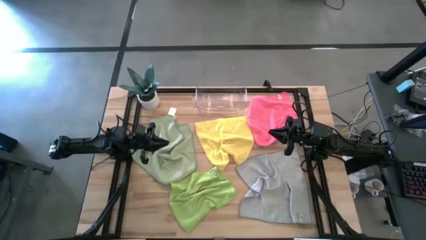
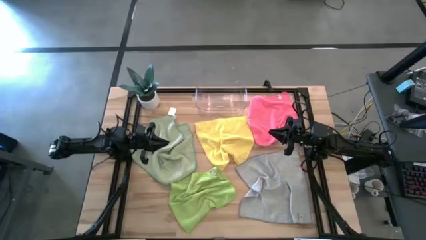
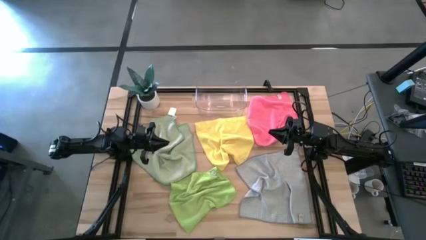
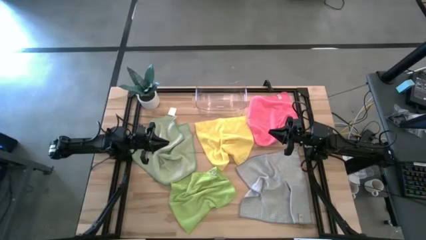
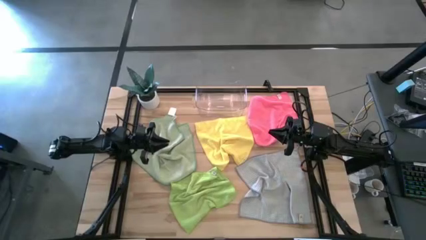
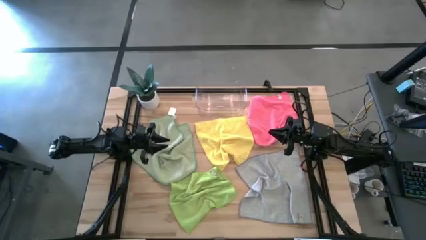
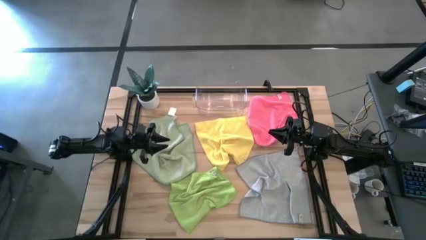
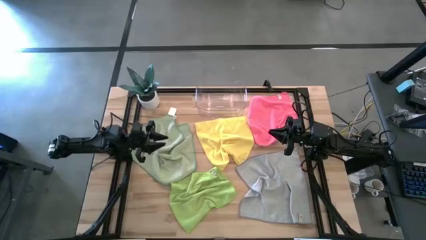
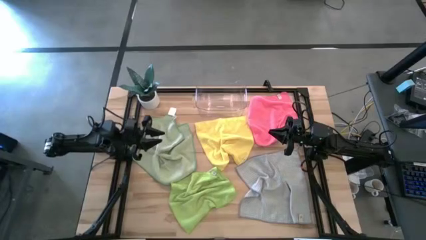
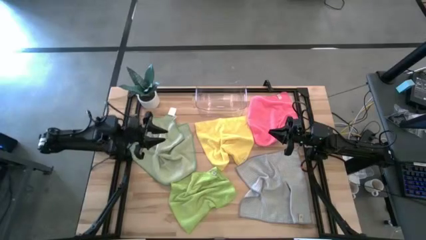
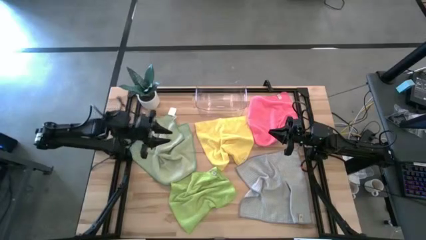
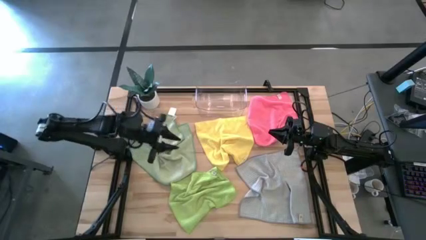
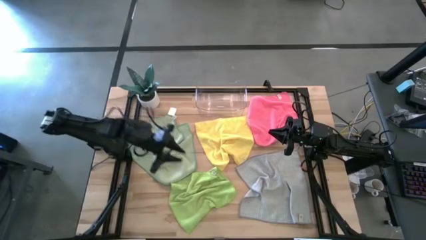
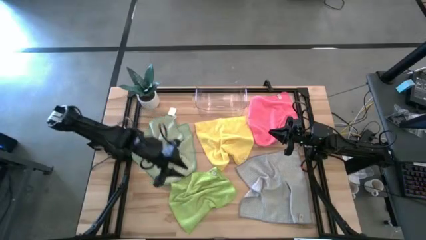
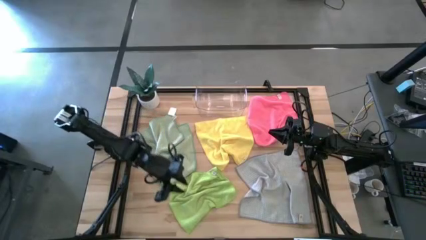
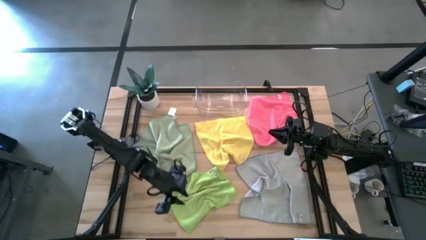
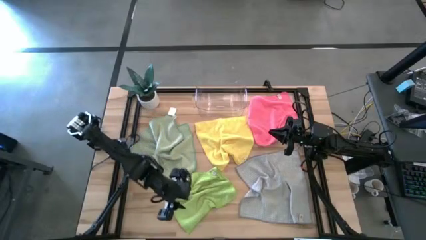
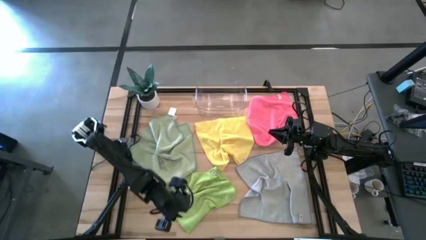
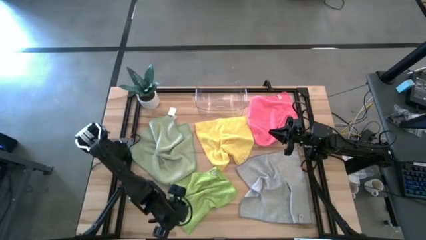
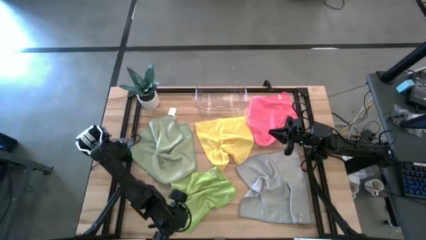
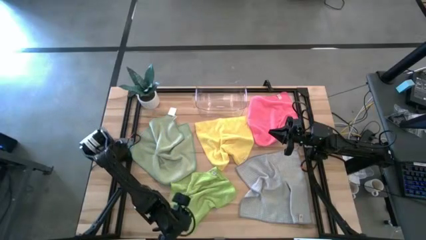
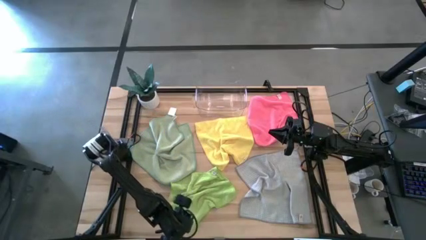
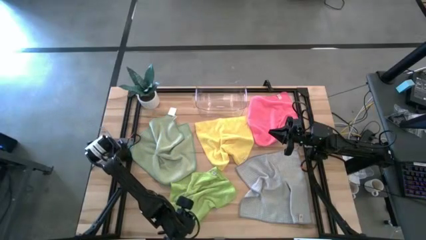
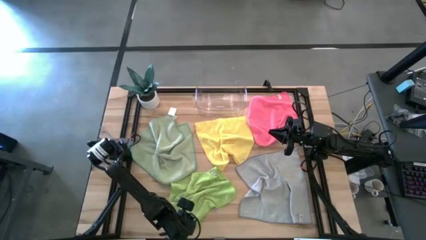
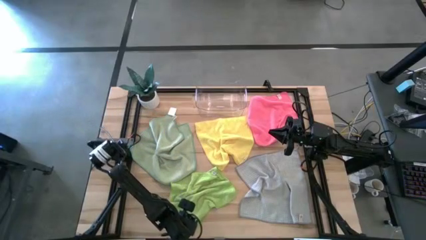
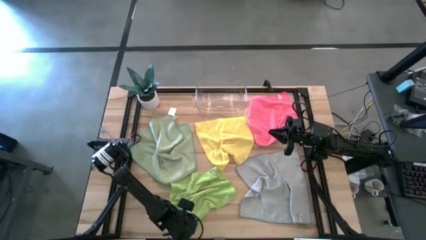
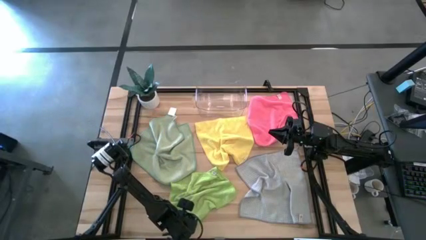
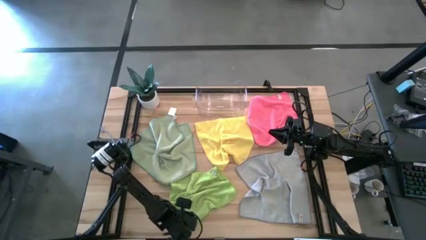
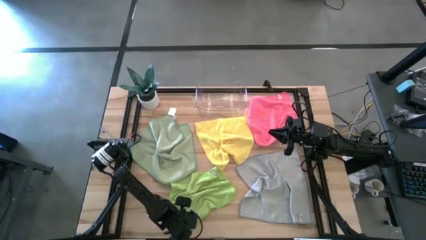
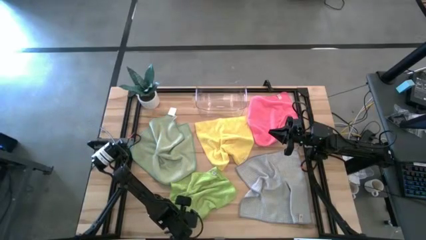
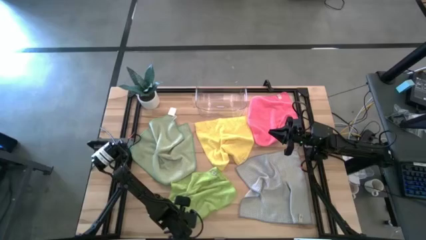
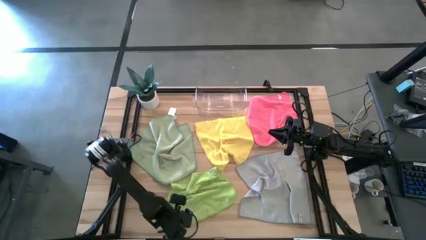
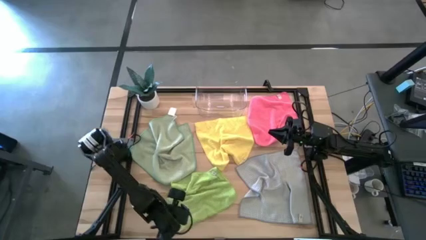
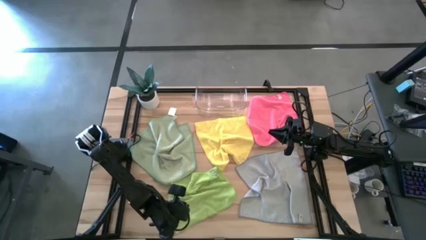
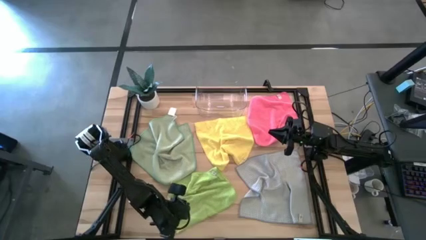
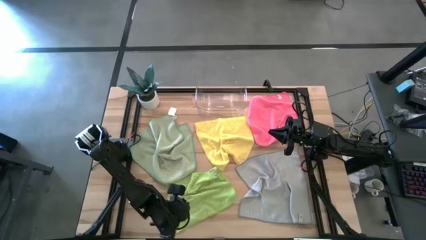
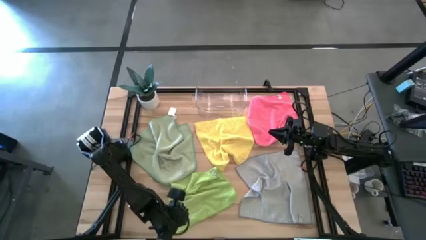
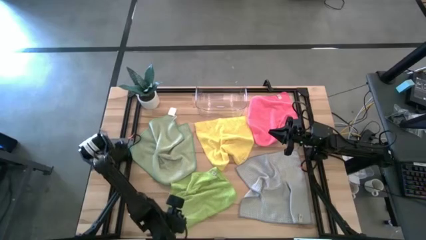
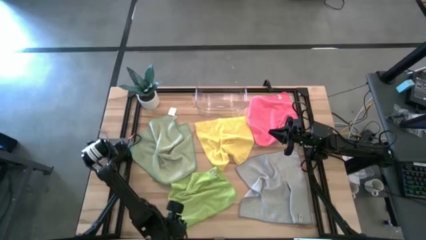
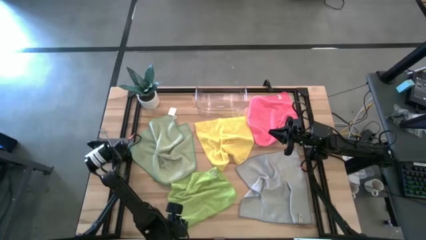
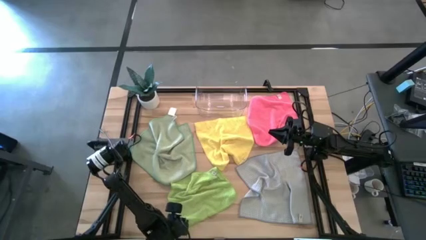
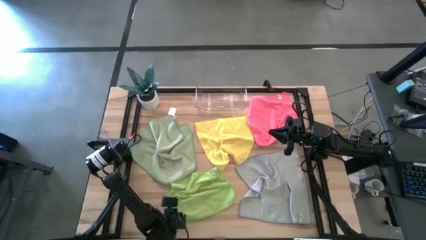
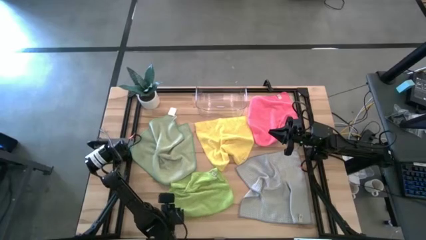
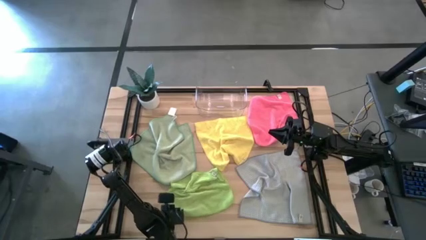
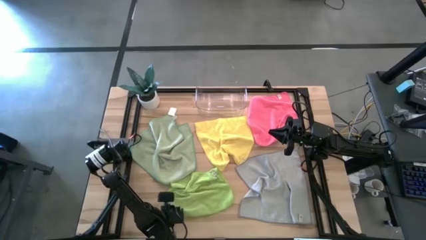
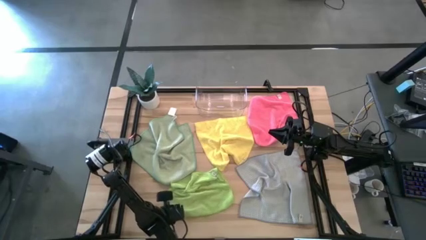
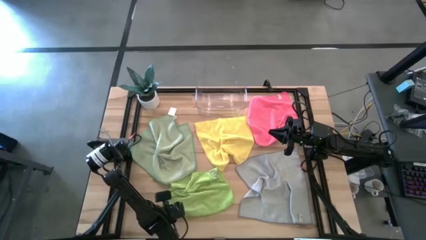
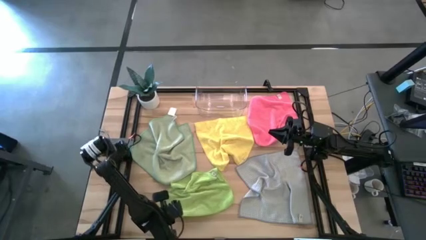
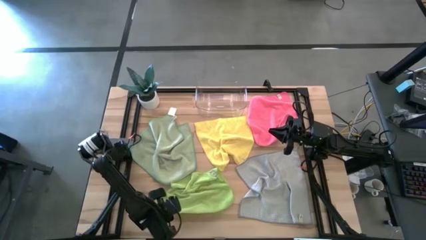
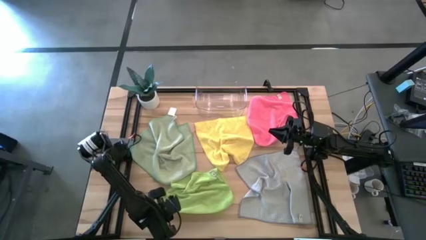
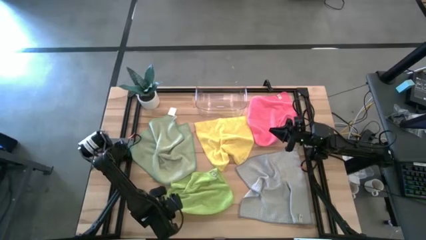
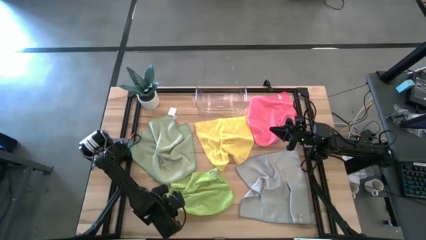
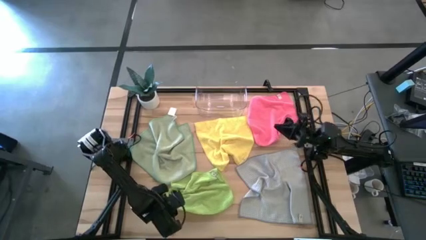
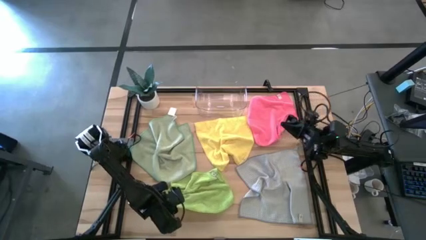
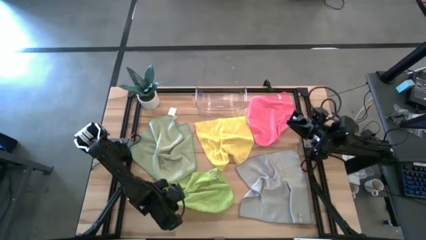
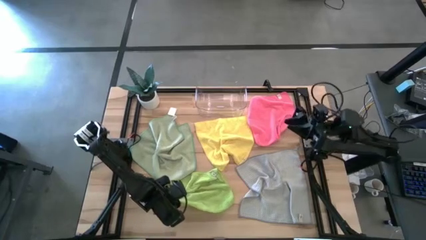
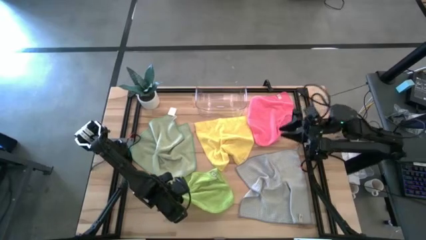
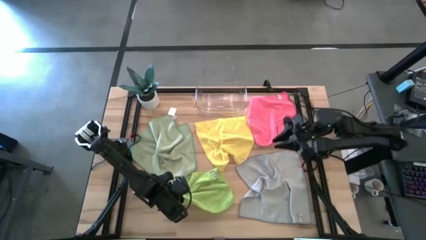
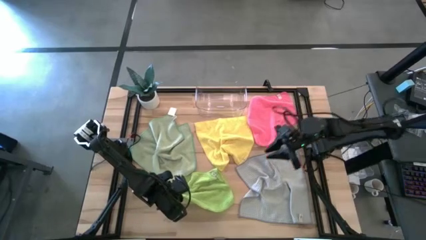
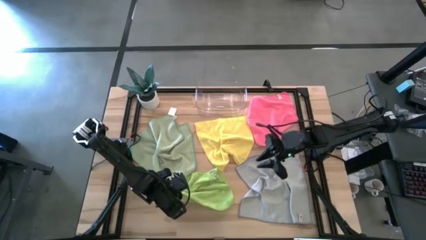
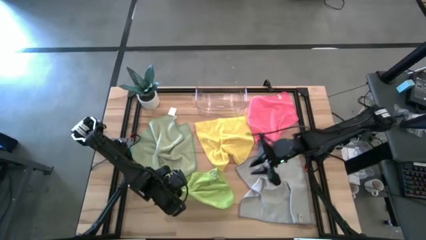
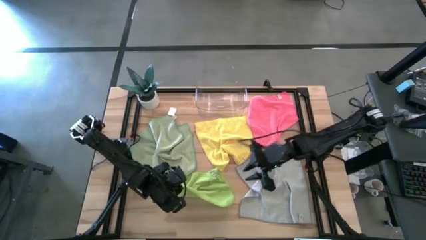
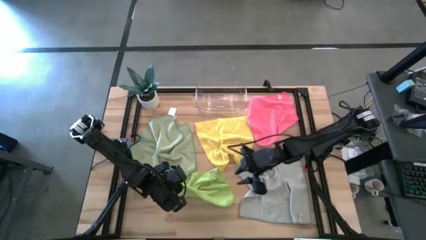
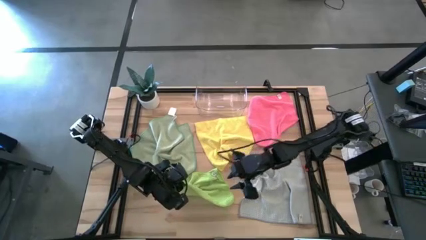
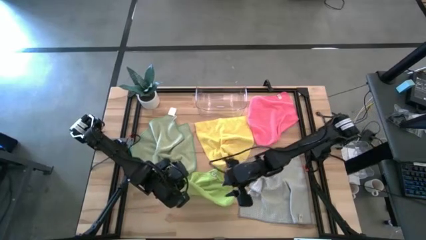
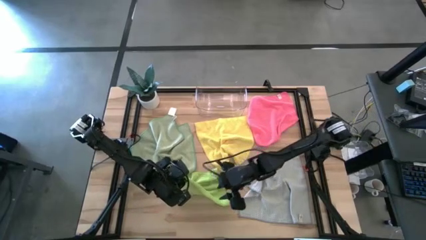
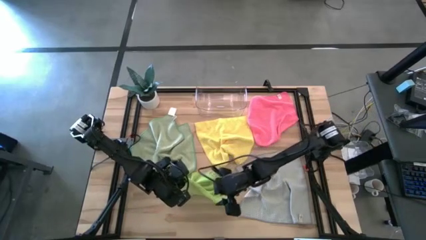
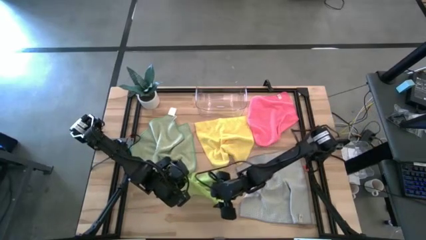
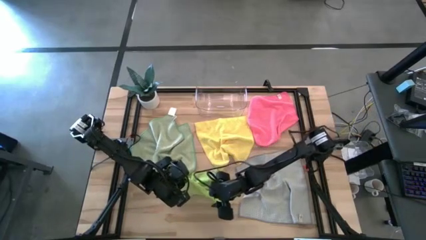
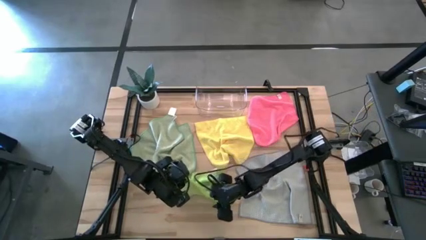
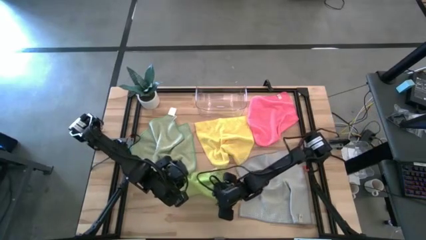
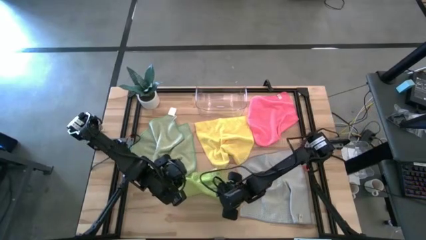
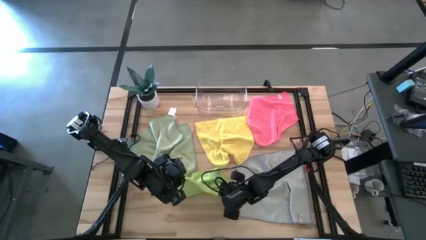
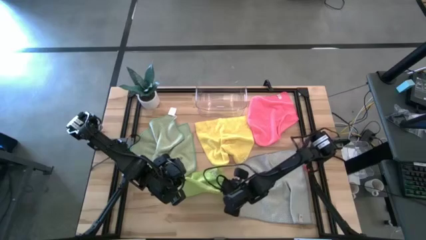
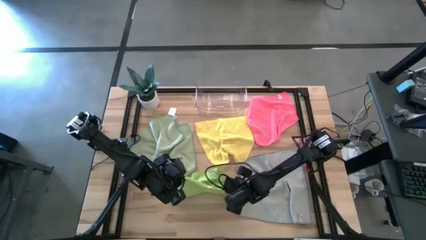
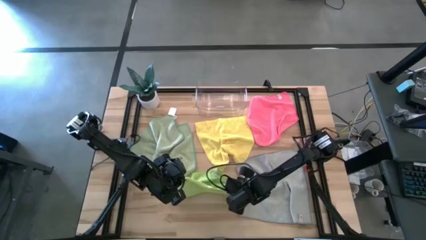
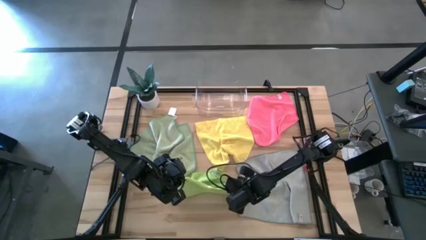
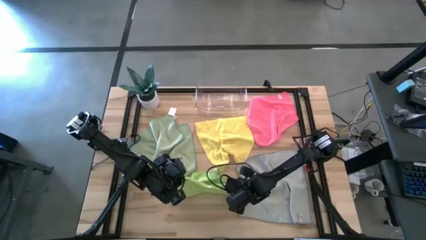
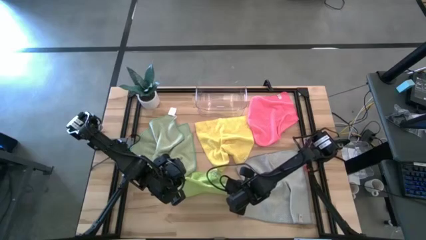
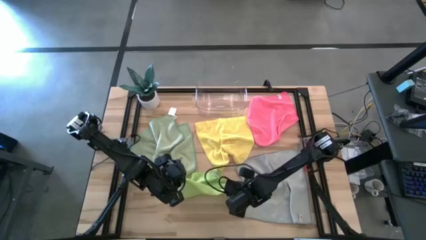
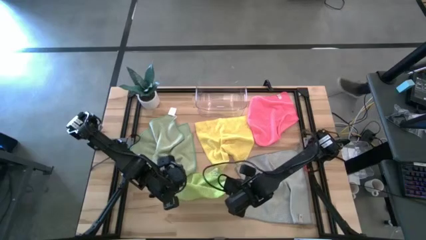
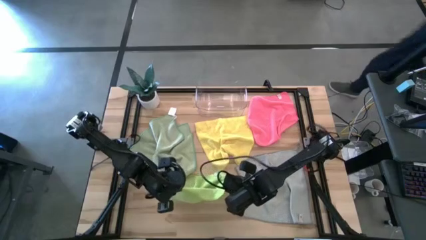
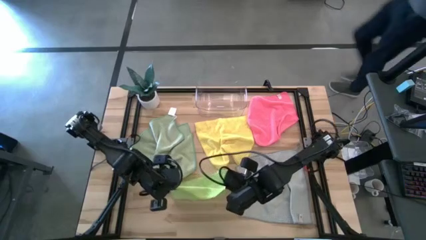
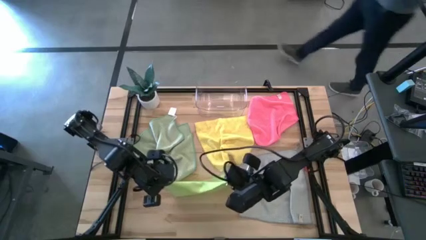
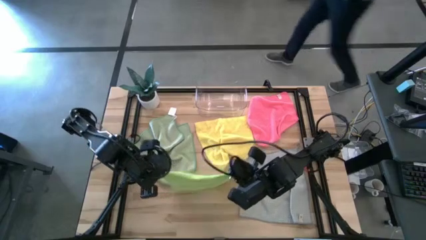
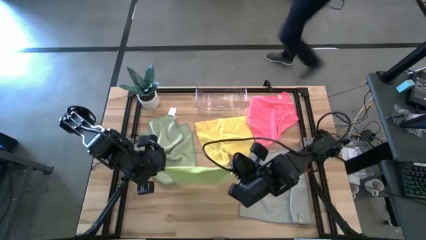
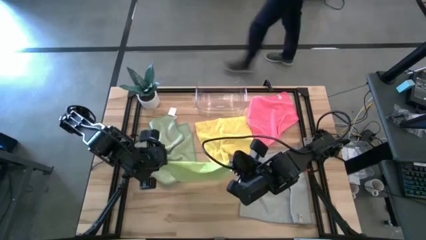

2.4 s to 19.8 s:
Task: Fold microfiber towels
Fold the green microfiber cloth
